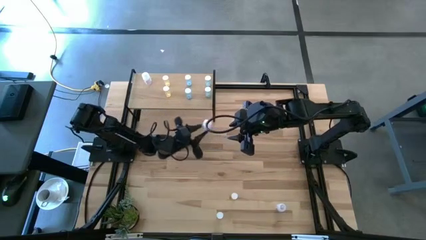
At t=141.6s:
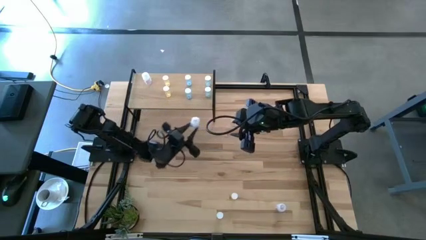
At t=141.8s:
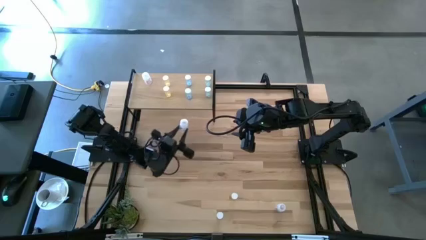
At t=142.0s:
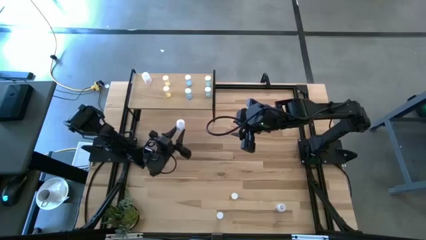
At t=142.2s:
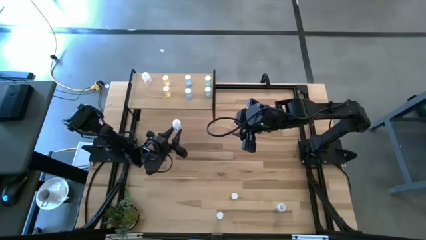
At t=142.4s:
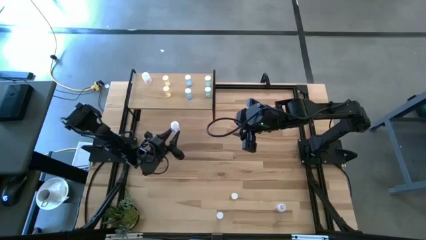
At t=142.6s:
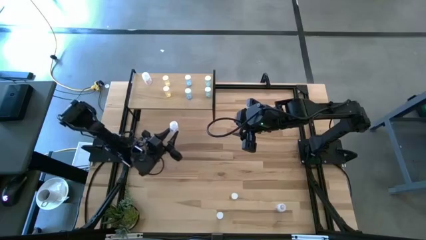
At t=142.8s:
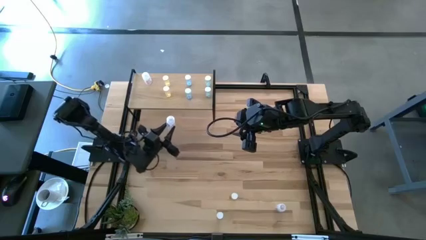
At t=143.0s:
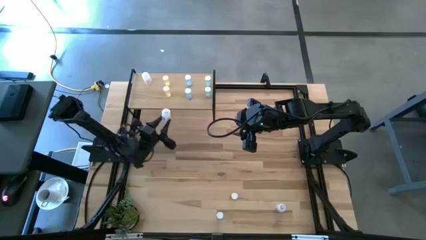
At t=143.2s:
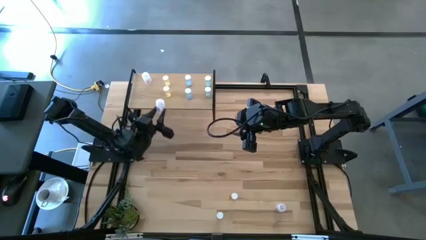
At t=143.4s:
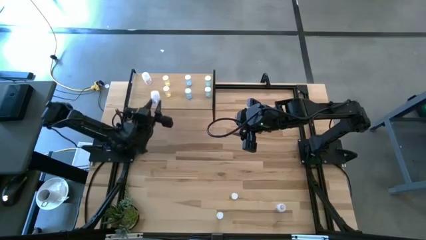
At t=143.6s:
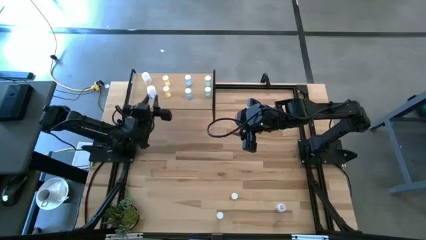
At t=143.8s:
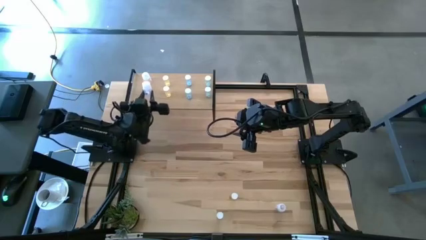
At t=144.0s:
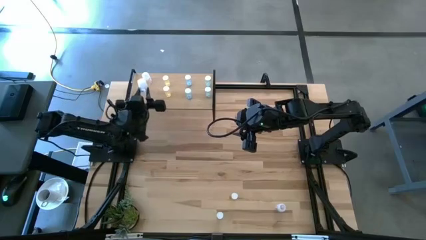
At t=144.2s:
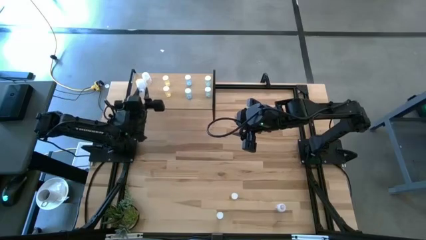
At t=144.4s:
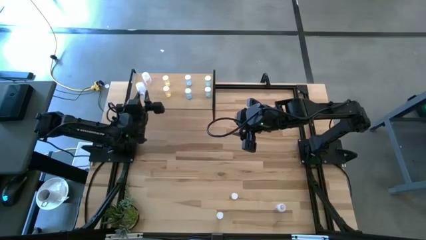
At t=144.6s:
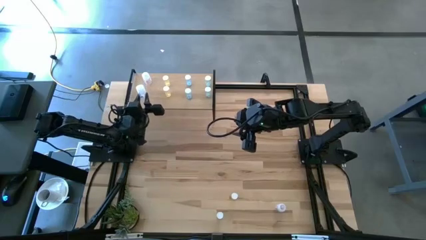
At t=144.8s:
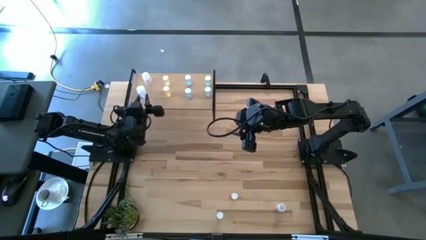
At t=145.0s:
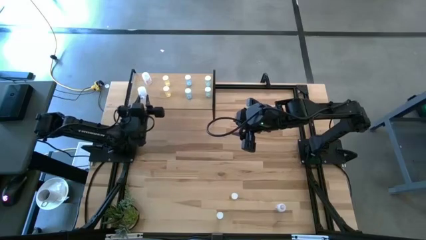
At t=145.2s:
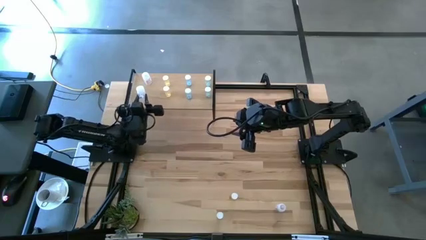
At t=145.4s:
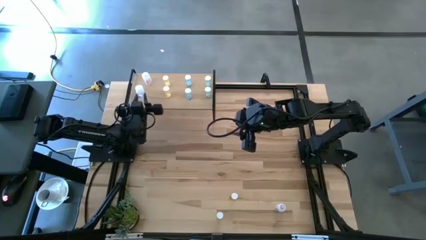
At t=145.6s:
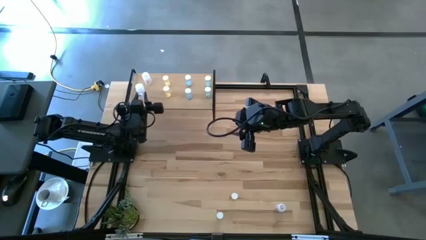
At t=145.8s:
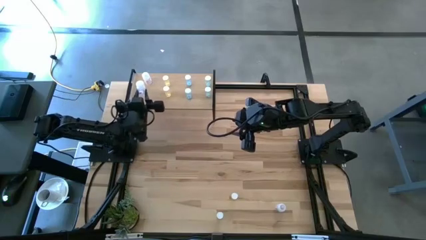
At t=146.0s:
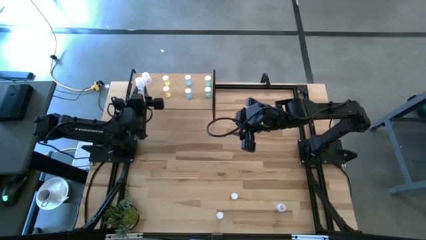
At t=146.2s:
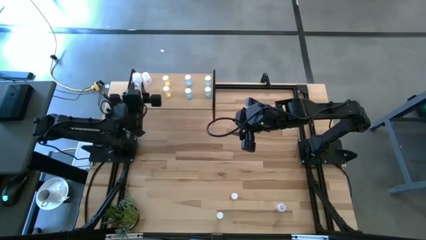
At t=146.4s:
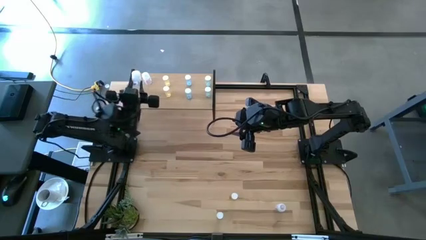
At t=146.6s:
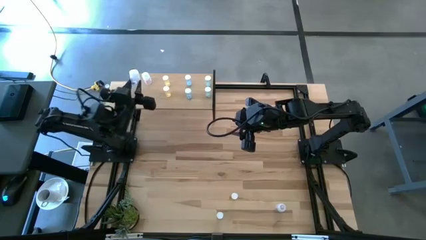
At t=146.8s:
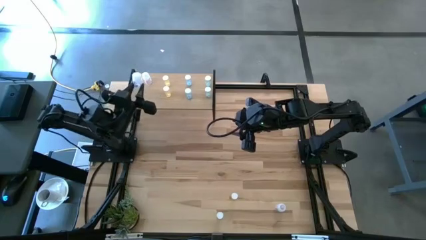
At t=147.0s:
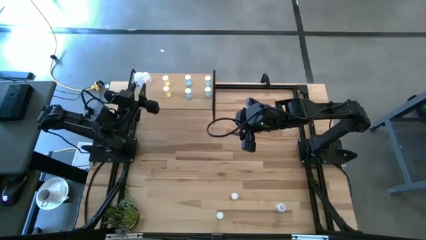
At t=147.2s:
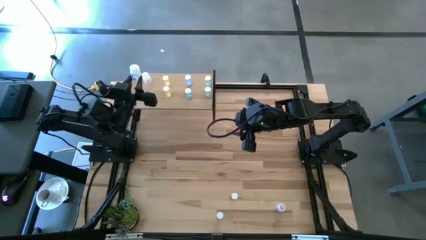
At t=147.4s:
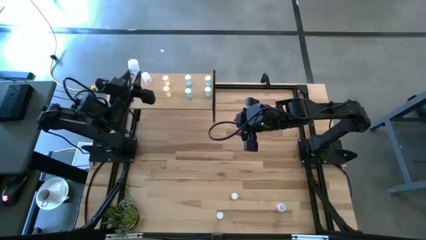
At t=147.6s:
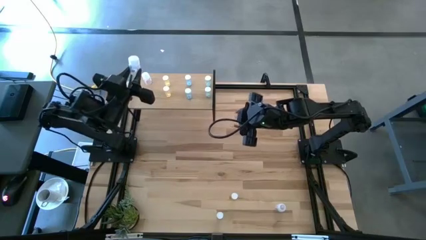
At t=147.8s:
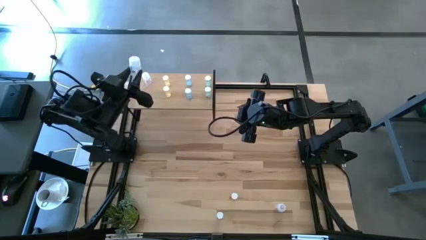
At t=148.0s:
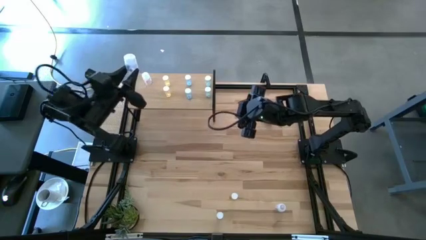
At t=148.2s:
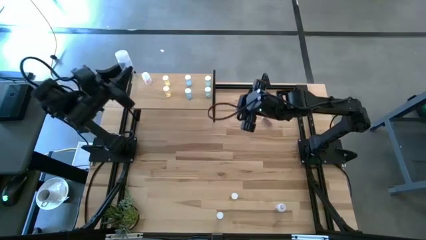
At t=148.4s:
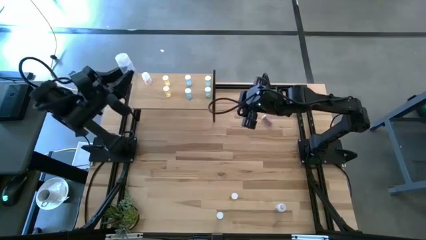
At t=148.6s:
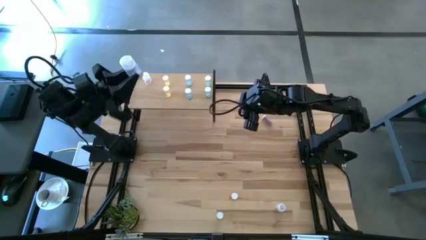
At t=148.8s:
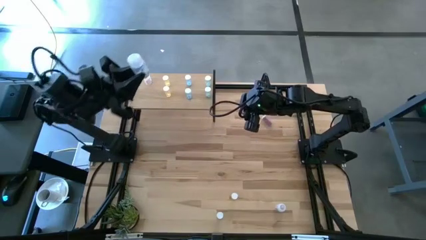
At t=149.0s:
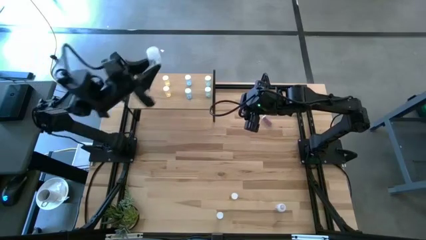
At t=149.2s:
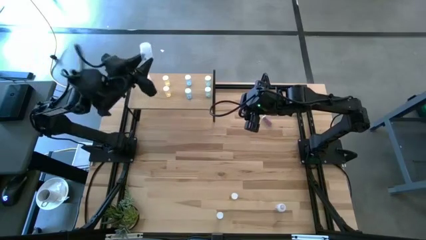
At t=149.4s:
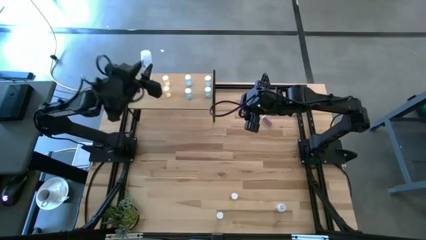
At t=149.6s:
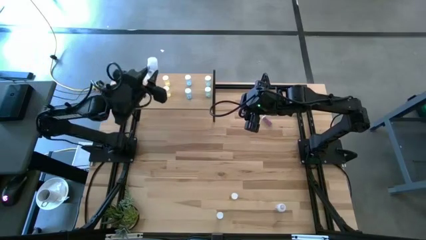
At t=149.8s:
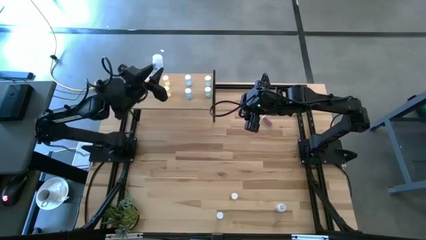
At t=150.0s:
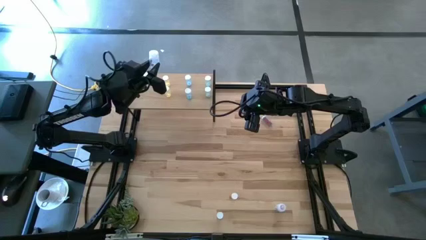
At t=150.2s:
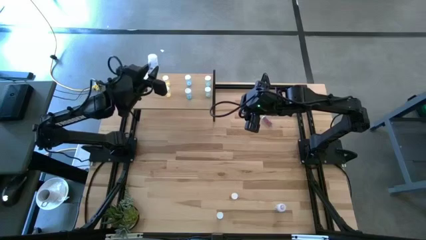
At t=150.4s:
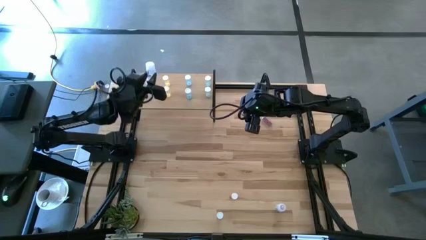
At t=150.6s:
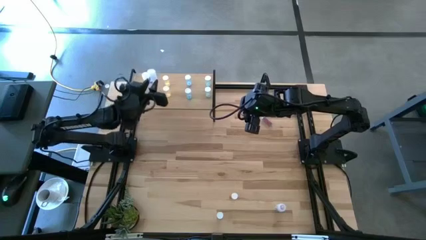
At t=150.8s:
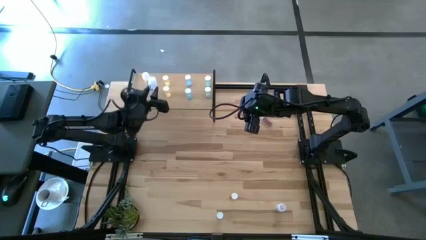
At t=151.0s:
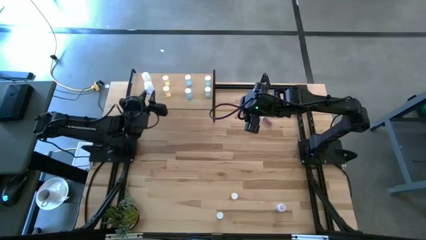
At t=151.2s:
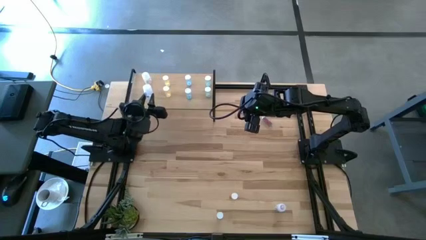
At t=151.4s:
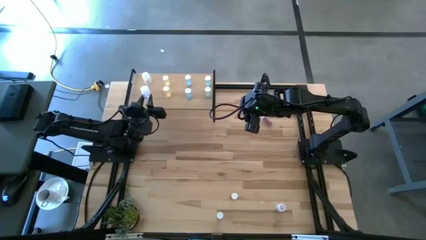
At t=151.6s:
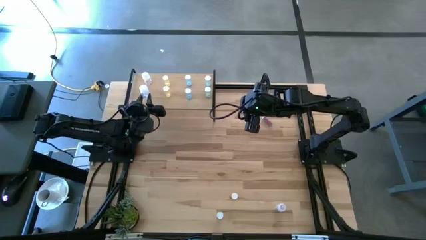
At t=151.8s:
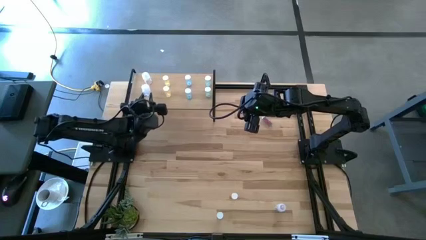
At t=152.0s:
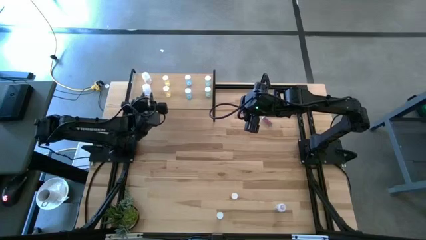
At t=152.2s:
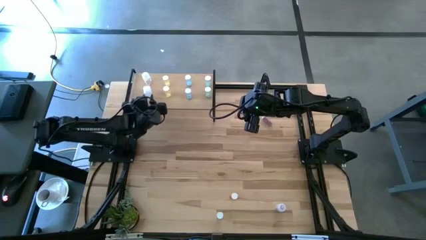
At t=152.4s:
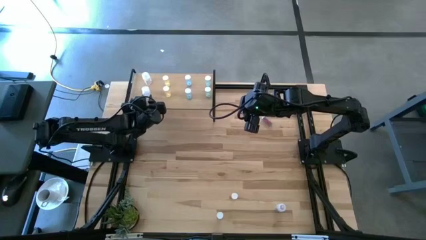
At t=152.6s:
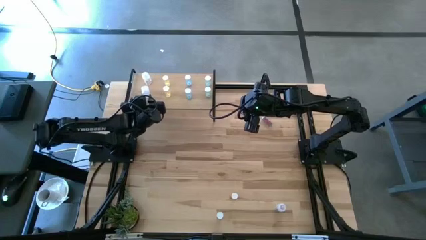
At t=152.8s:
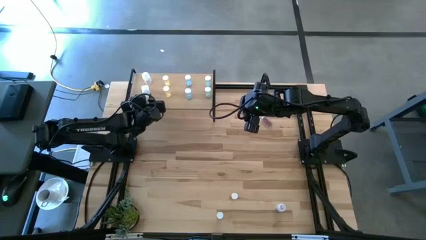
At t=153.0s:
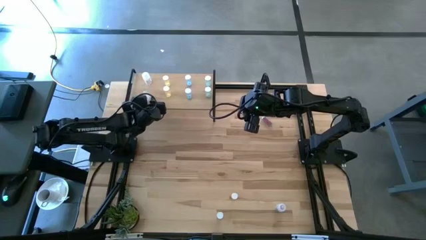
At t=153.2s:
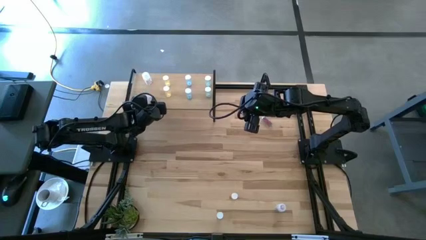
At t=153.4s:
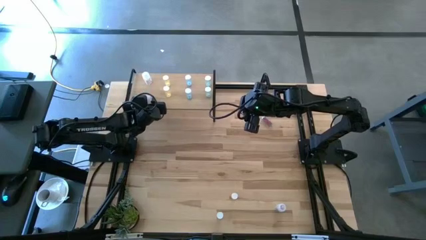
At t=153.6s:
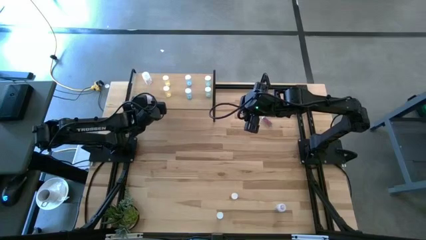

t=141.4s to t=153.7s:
Task: Pick and place medicine bottles onto shelf by color
Put the top white pill bottle on the shelf aligned with the other white pill bottle

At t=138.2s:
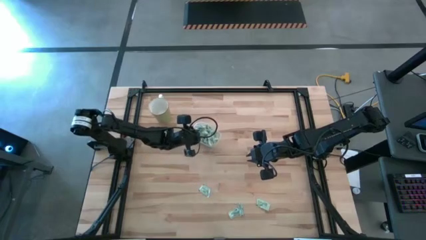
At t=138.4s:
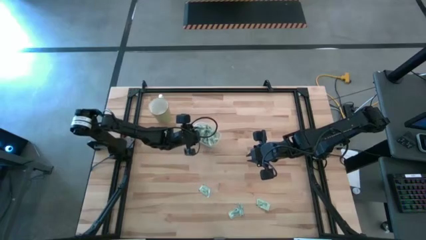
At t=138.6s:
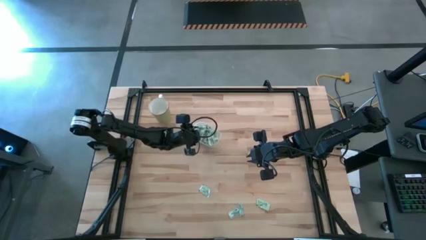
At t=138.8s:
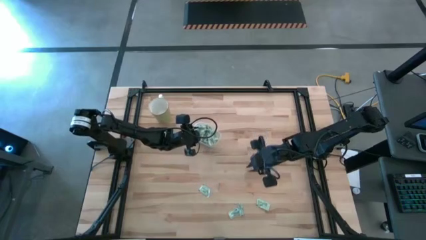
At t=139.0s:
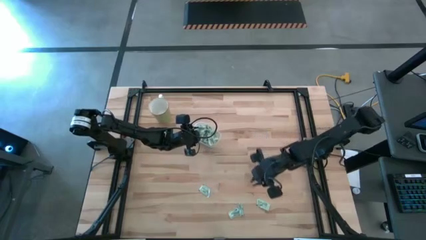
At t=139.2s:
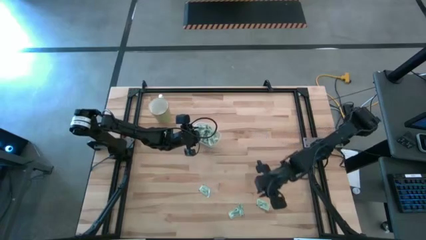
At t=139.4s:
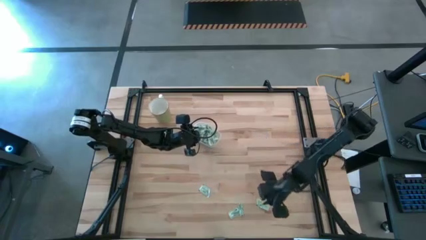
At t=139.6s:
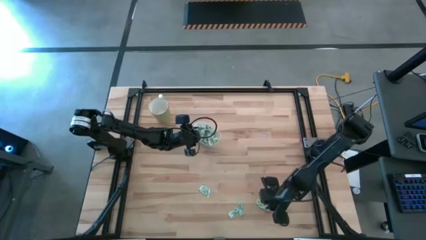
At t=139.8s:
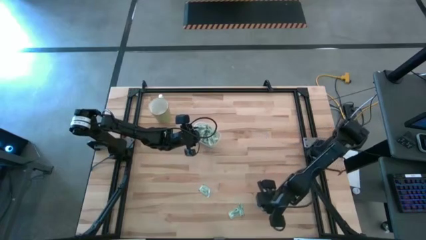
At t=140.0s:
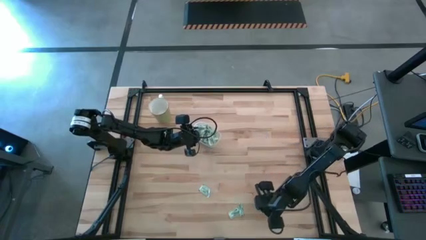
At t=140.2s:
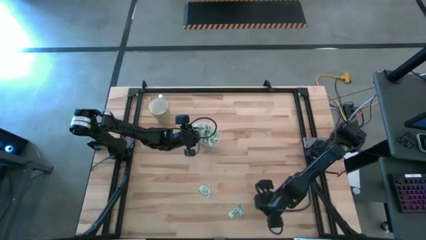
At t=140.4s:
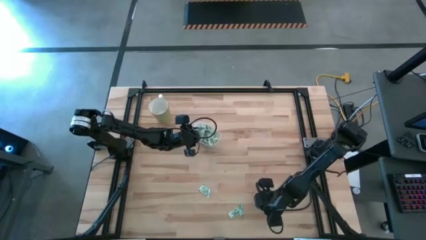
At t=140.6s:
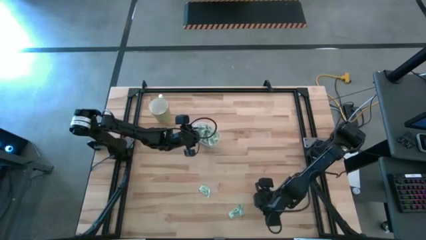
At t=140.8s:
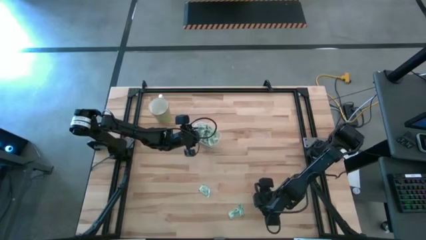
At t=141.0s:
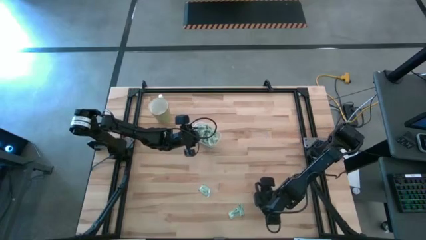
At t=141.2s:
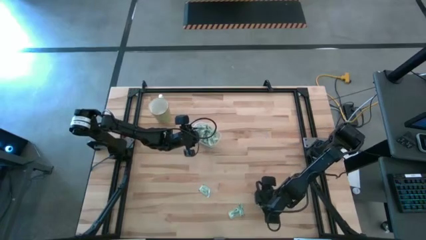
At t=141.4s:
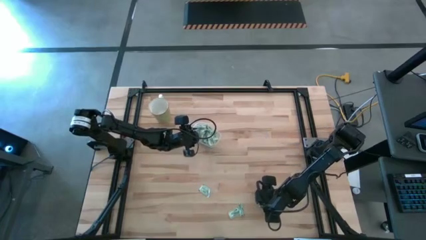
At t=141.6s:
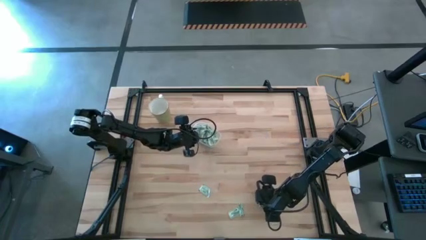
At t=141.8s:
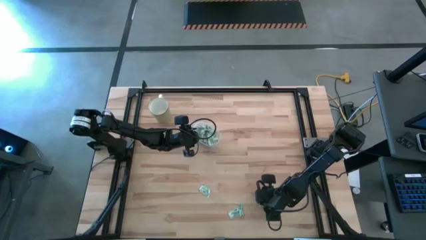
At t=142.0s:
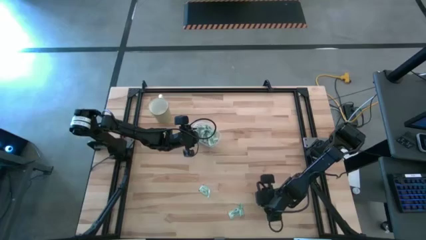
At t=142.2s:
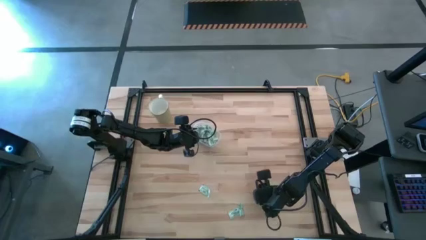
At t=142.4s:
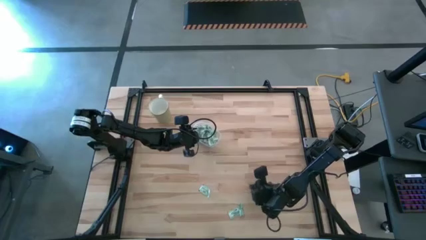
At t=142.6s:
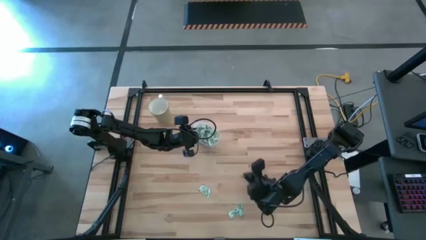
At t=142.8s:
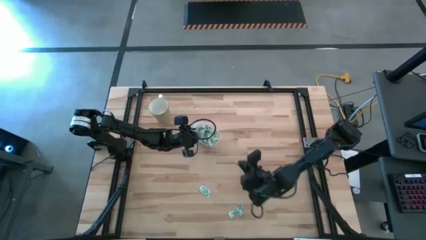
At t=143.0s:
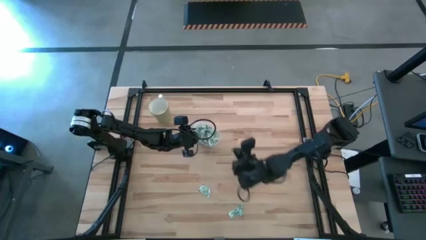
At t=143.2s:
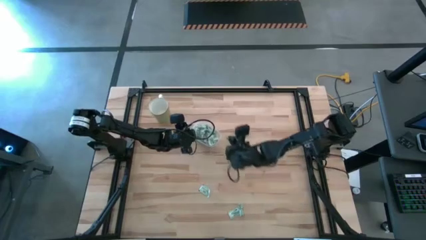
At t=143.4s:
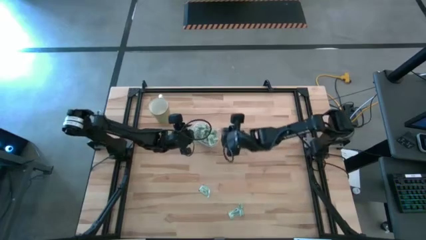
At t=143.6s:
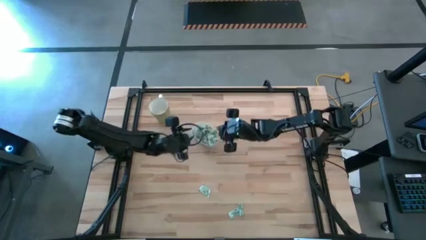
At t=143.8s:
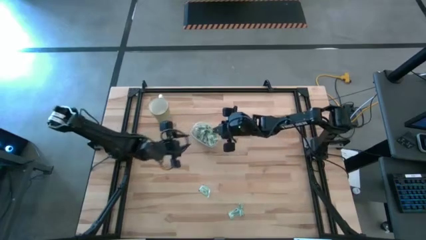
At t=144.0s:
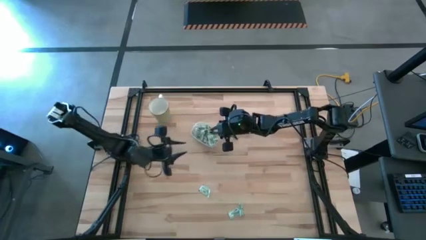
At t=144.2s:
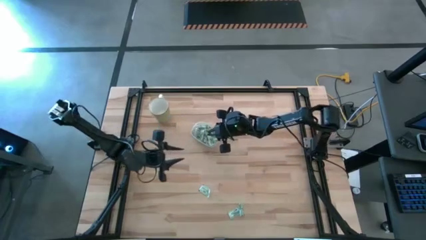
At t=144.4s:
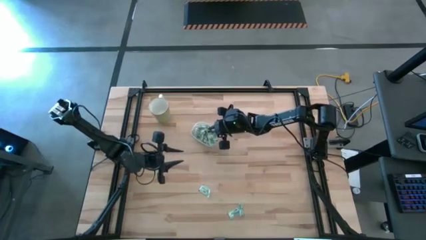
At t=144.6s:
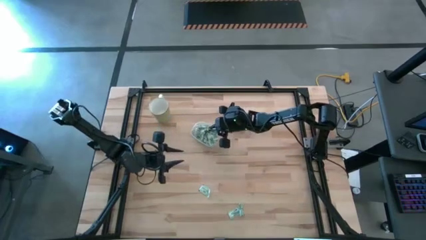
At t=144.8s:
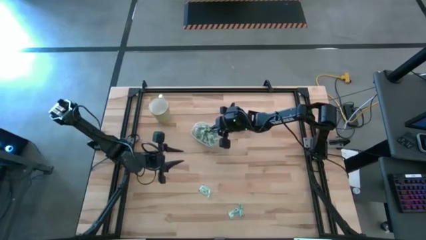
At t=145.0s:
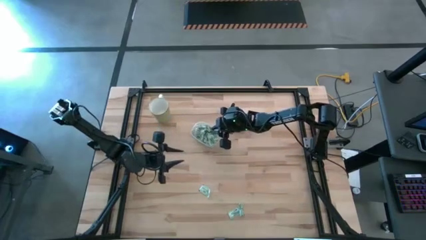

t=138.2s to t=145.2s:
Task: Pick and place Stevia / Truvia into bins
Put the stevia packet into the transparent container
